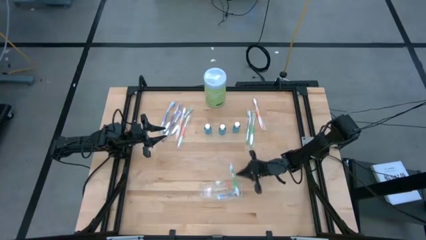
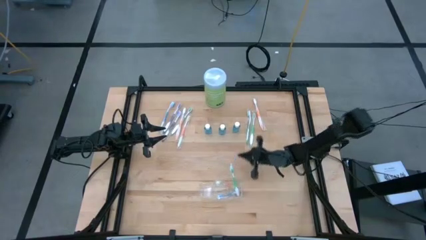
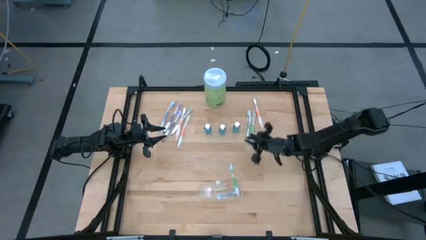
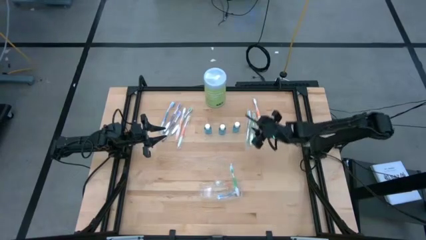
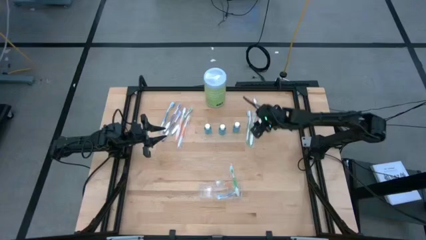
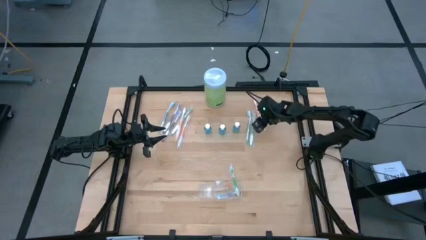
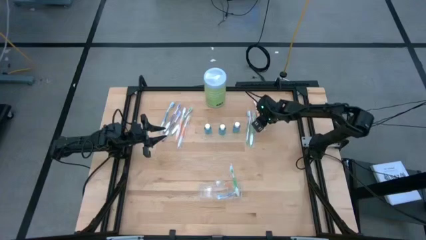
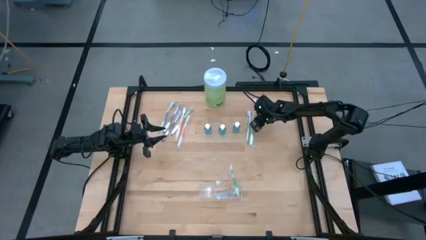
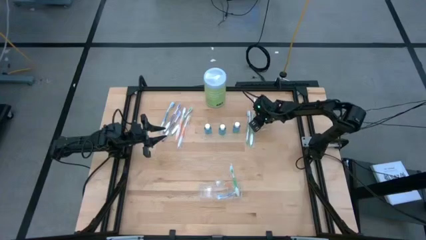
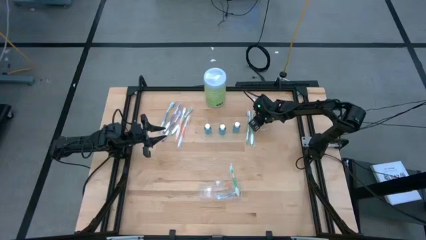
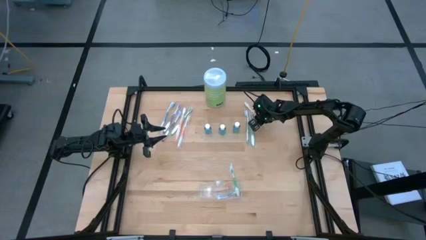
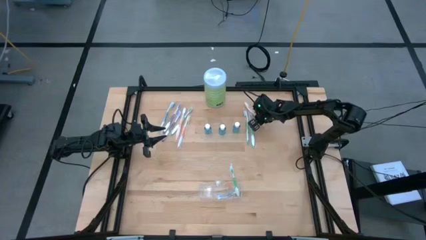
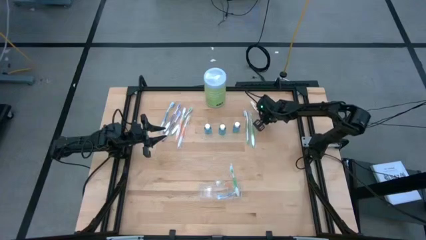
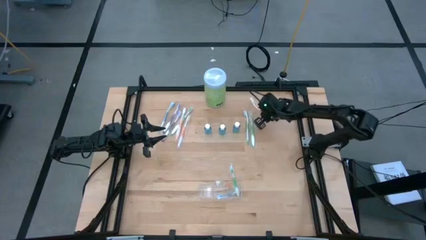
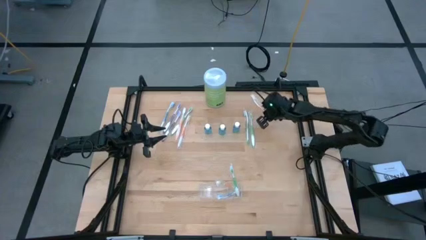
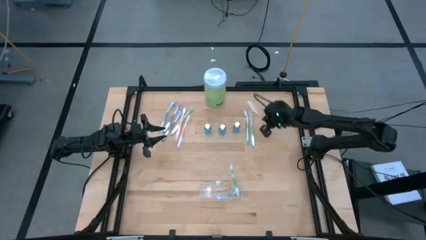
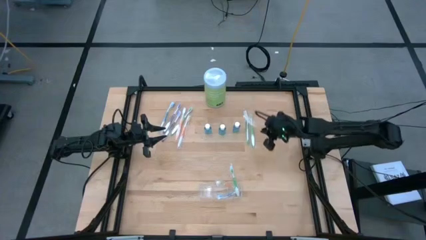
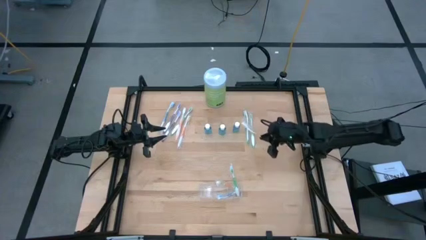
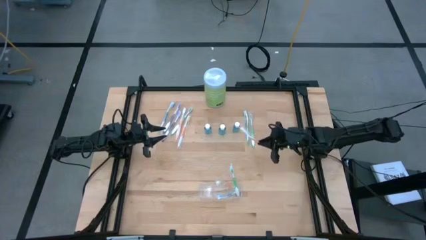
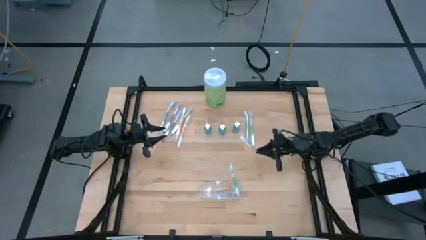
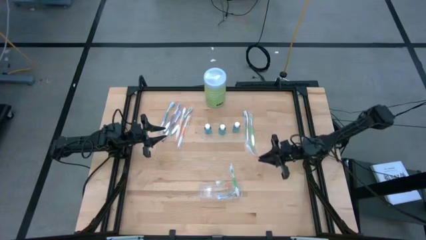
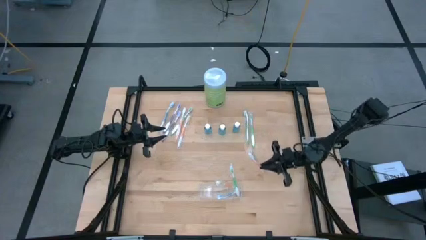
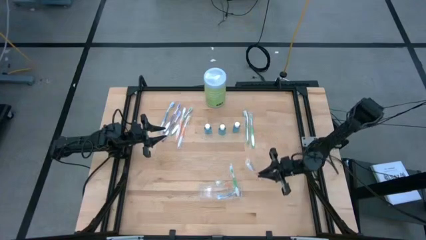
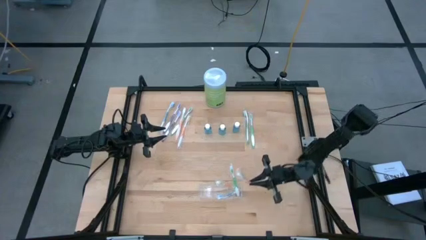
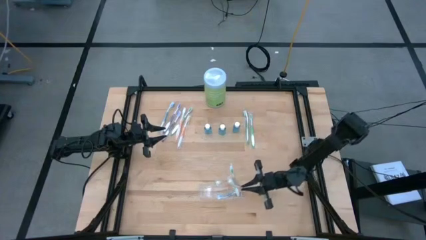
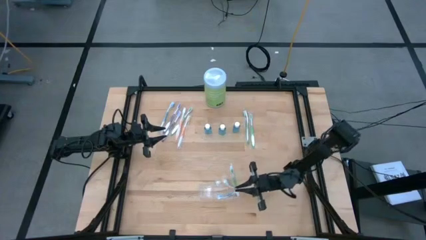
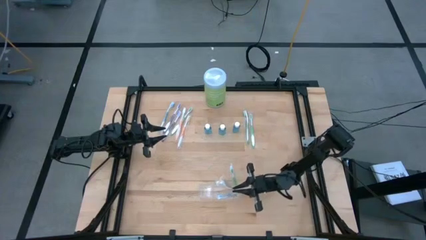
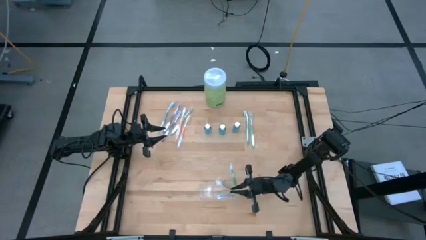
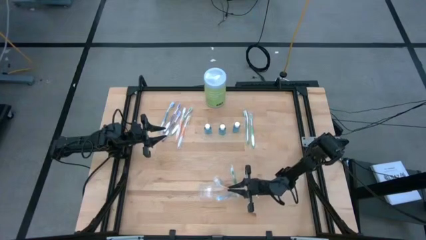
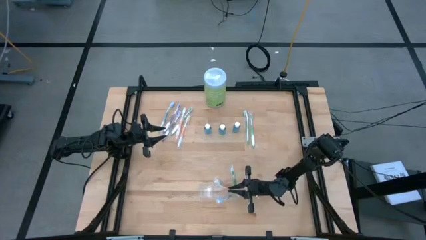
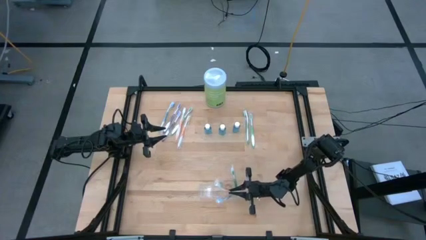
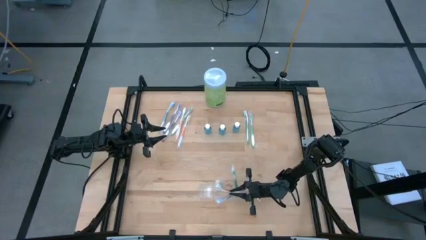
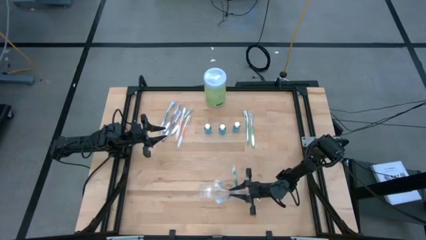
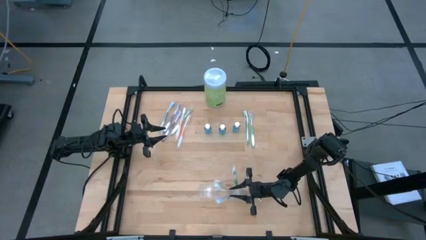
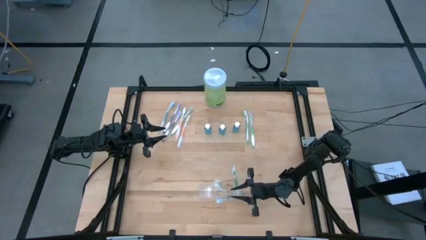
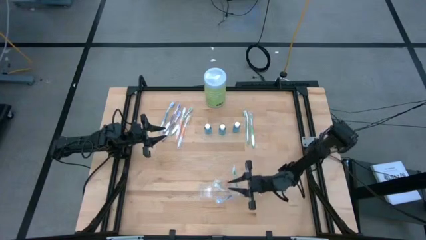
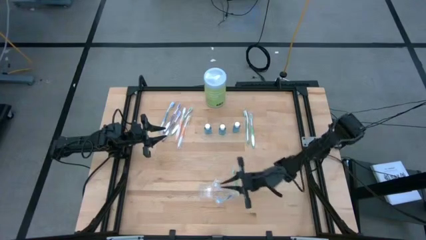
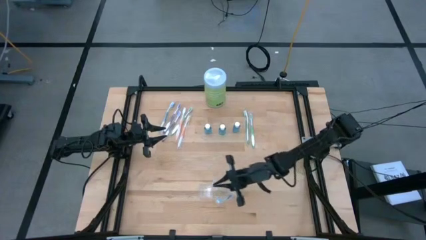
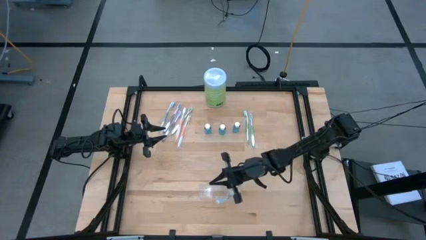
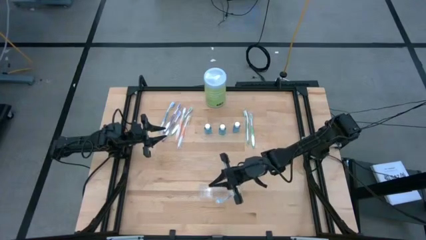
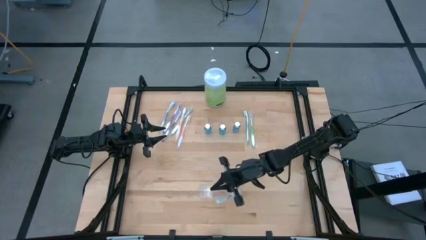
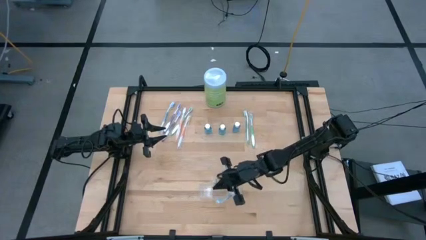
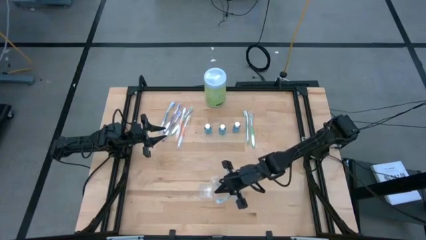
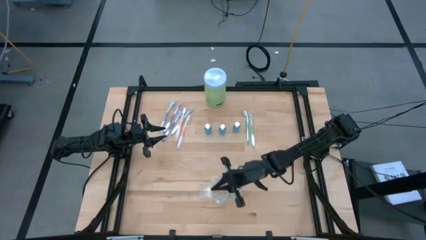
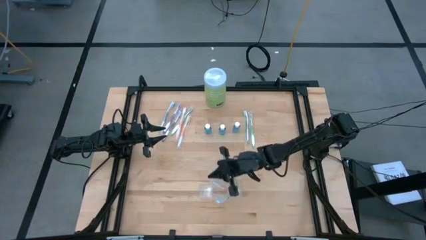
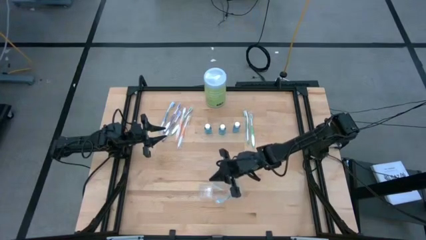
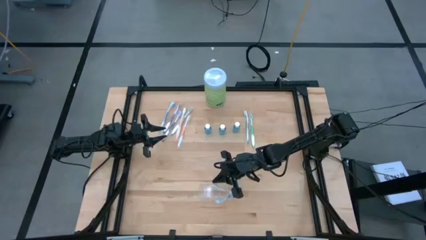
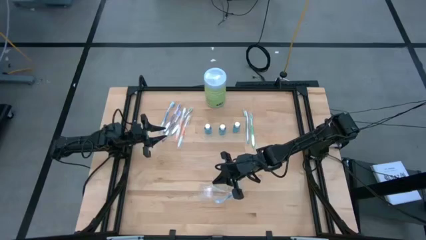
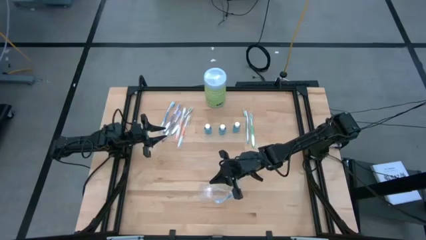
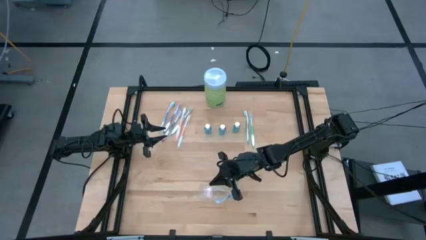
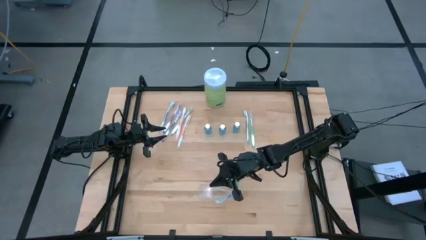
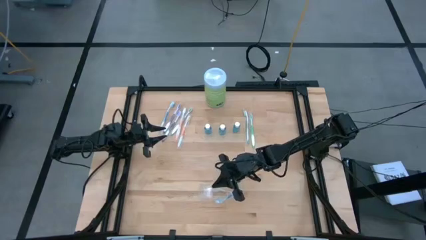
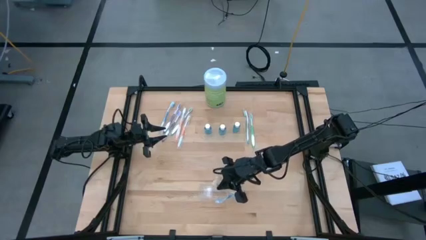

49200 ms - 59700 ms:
Task: Pick & Place toothbrushing station
Put the orange toothbrush into the transparent organizer
